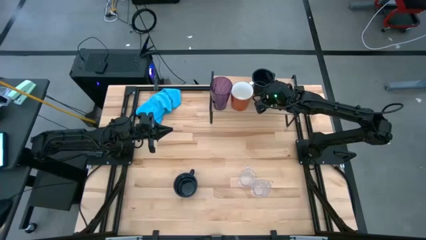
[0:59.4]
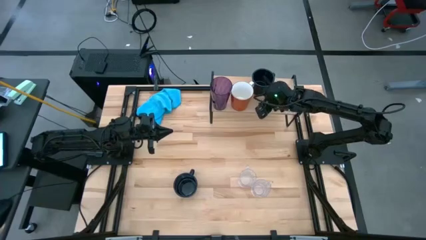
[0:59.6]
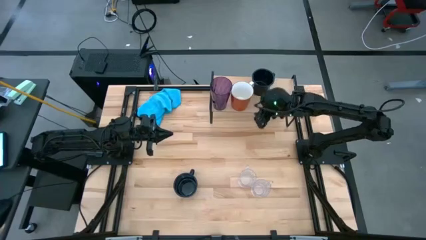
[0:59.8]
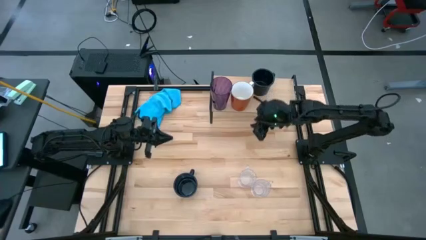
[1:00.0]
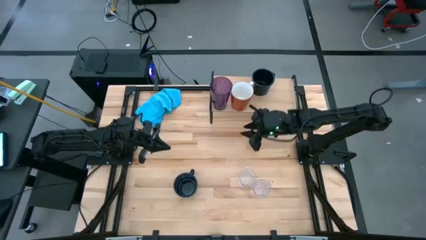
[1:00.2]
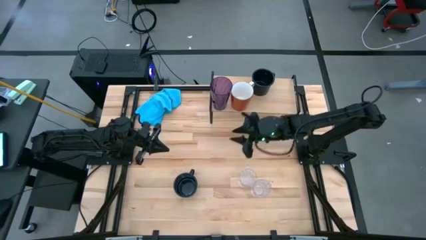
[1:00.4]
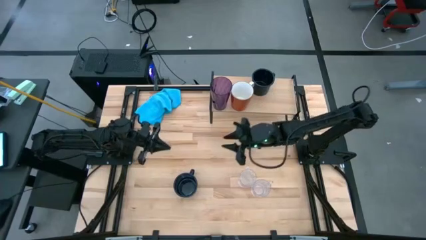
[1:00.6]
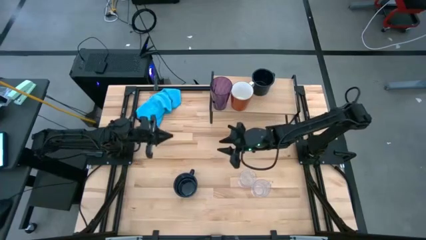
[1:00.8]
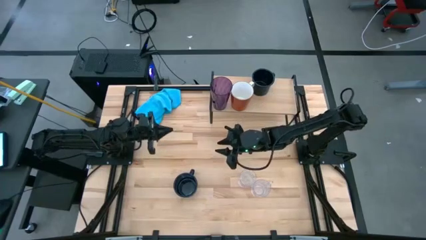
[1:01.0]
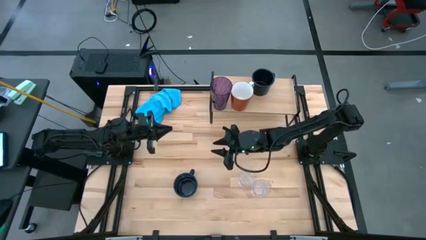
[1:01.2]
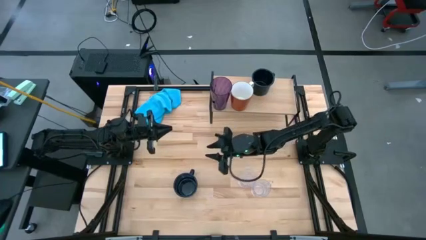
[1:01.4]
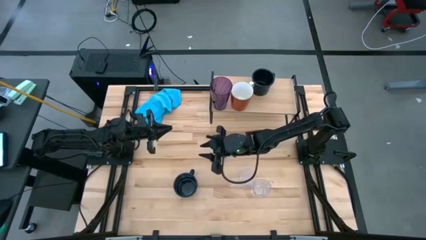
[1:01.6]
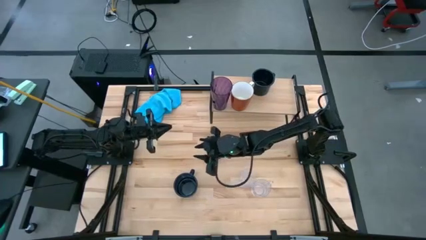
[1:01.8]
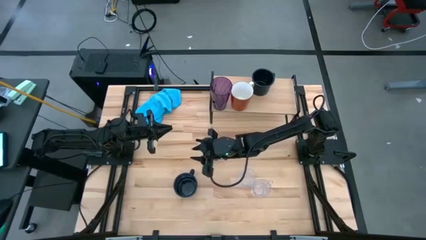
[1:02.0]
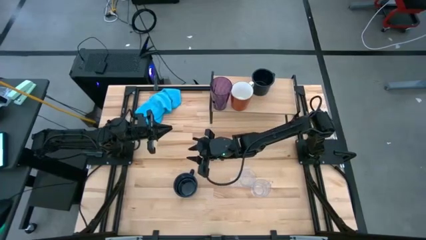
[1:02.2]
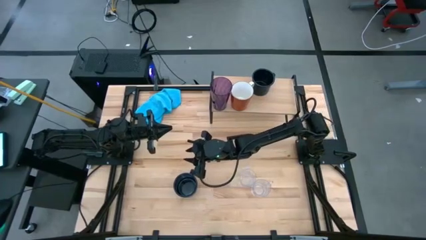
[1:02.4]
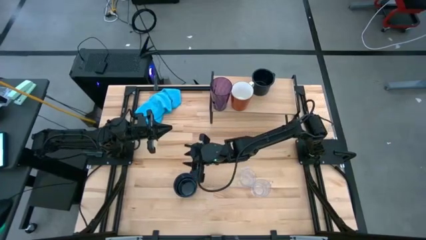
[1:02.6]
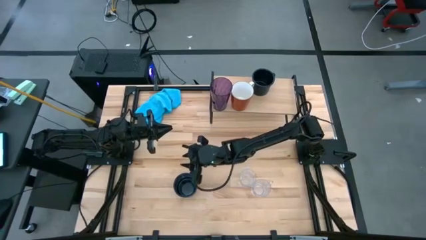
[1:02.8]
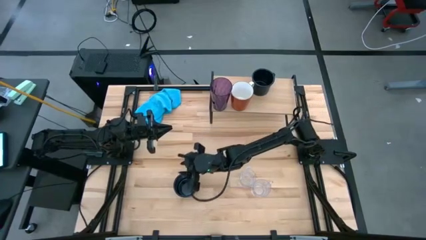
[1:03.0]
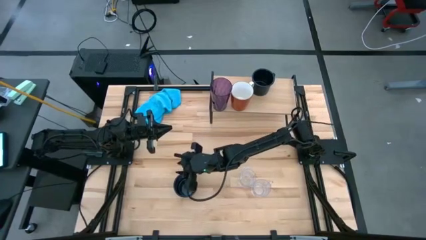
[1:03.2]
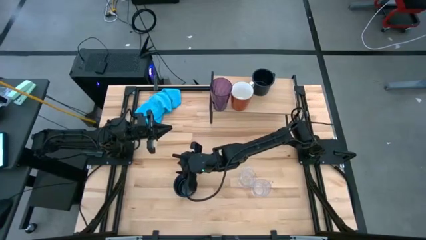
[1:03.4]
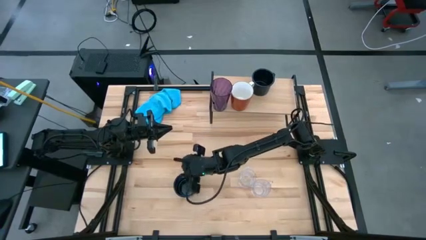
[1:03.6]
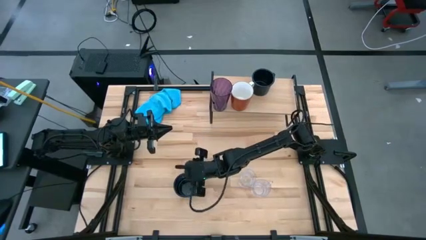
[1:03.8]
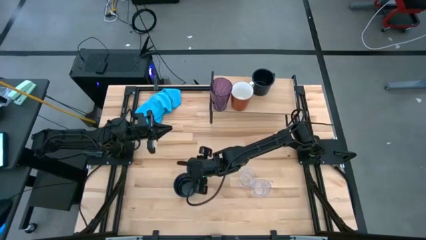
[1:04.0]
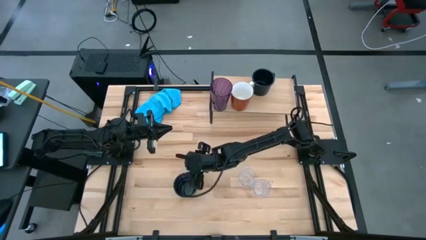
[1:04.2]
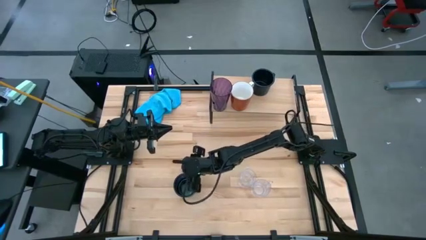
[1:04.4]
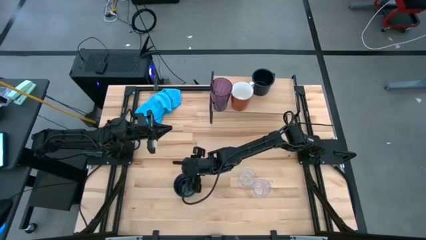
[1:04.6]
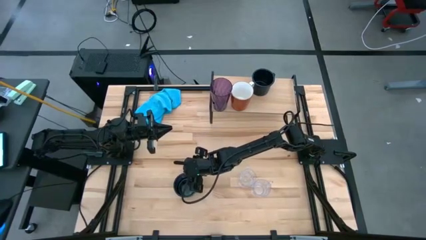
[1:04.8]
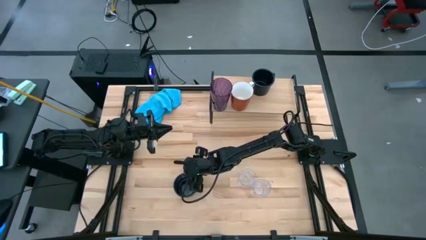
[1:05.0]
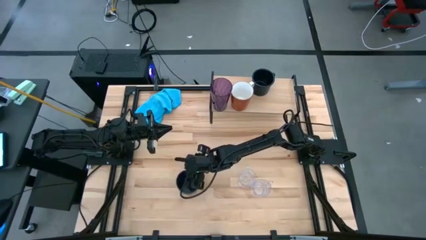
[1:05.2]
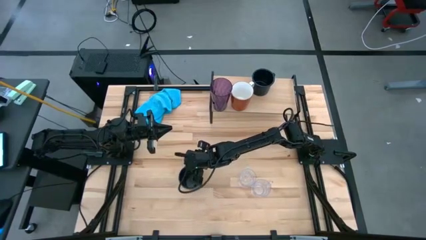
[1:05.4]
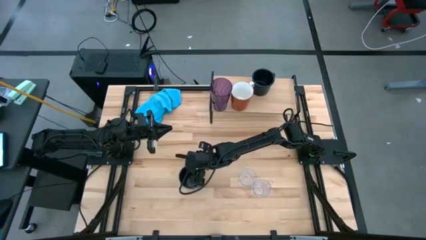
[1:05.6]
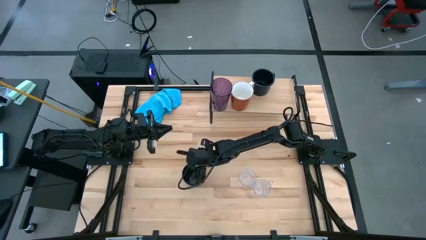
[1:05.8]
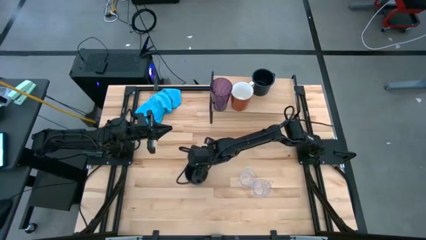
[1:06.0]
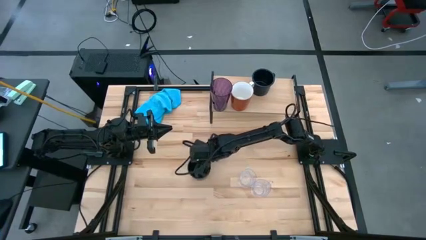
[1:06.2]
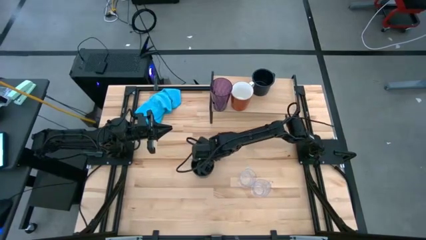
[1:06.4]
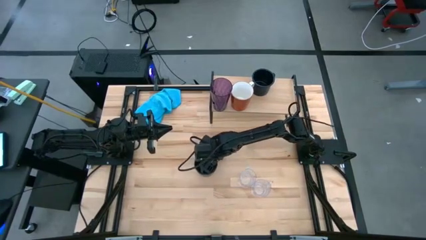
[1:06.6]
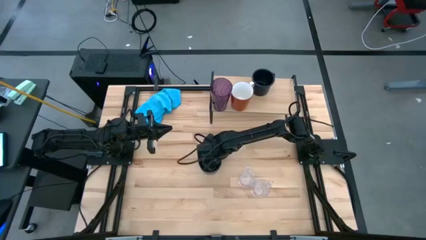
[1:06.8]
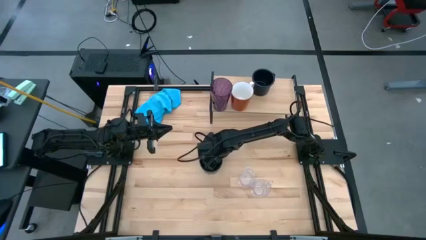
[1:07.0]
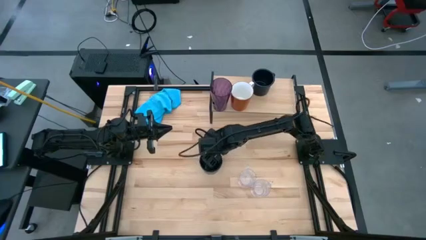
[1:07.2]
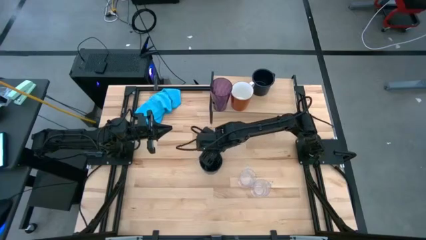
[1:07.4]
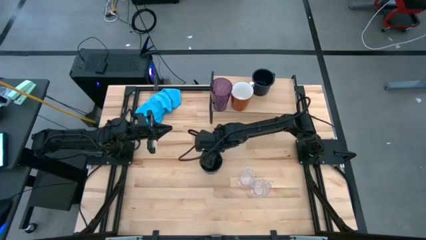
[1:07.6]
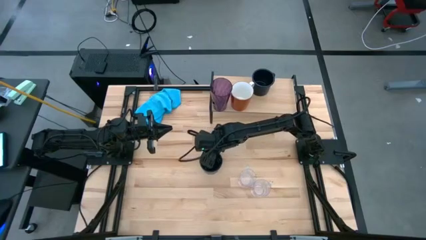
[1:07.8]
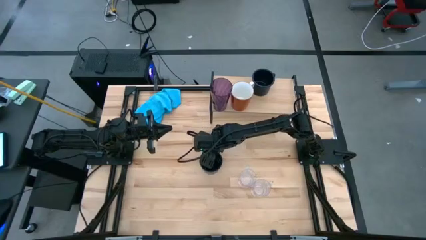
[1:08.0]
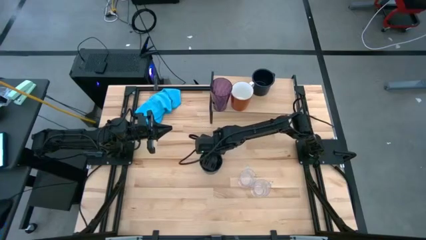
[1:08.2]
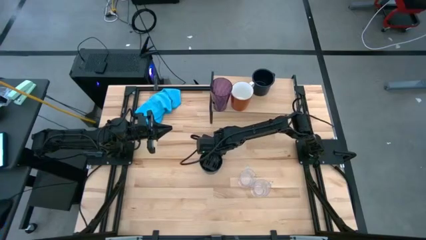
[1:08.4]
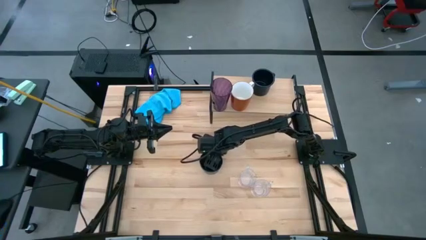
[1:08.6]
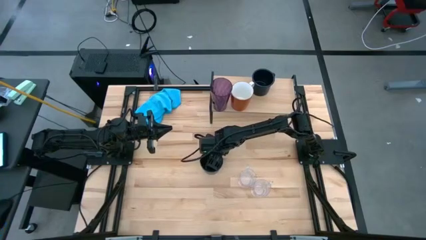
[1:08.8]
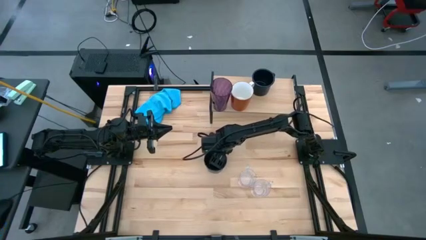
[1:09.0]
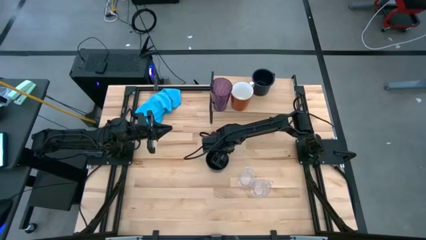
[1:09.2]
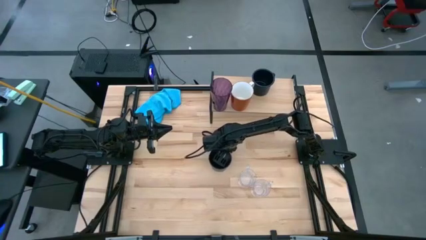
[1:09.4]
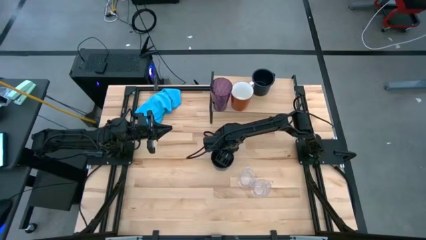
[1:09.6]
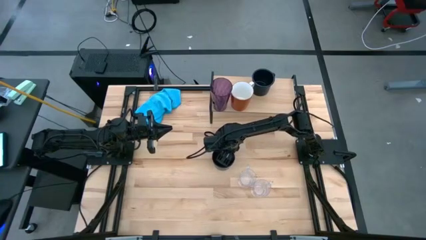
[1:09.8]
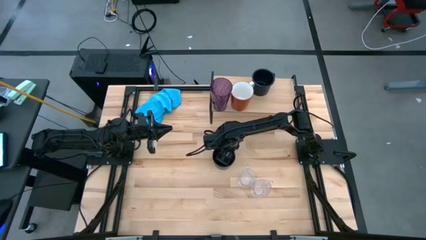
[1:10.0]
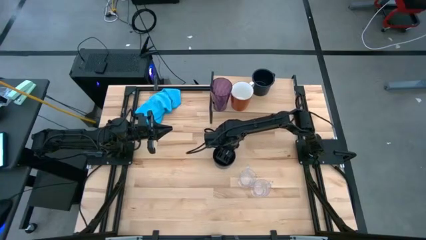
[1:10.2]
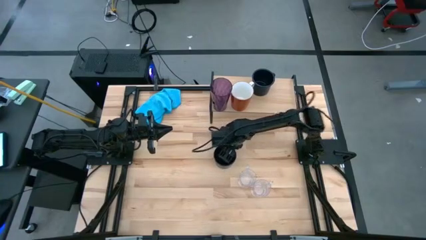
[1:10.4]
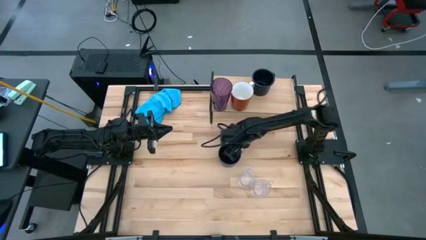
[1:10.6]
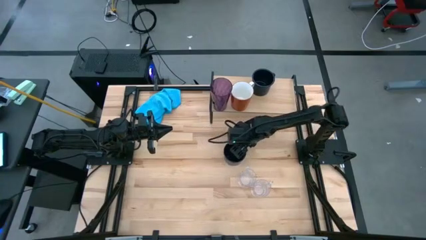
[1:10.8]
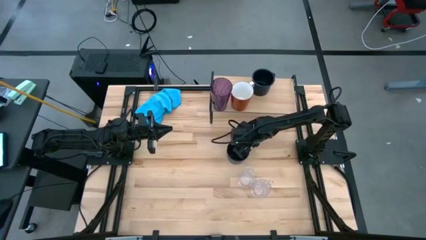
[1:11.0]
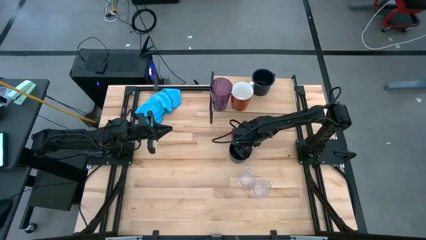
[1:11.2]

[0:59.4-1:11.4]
Task: Stack small to large cups/mugs on shelf
Put the black mug on the shelf aligned with the other black mug

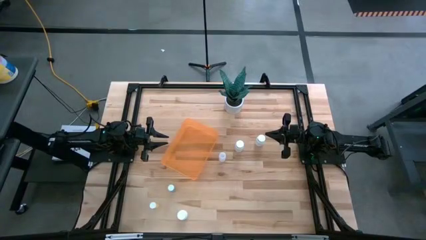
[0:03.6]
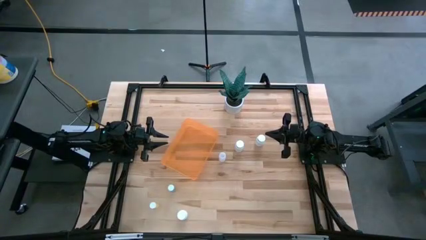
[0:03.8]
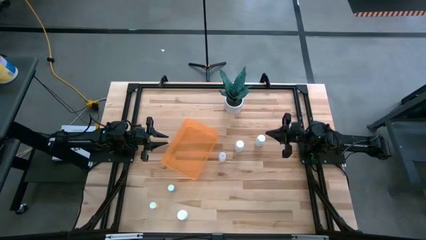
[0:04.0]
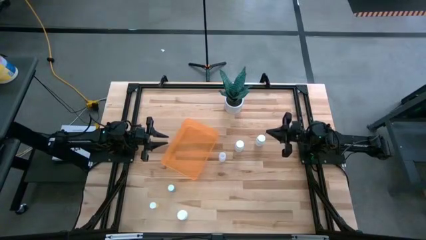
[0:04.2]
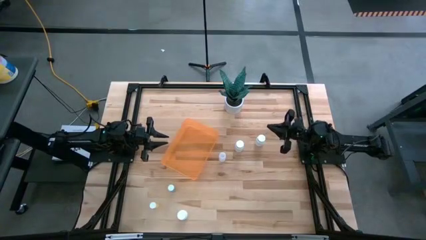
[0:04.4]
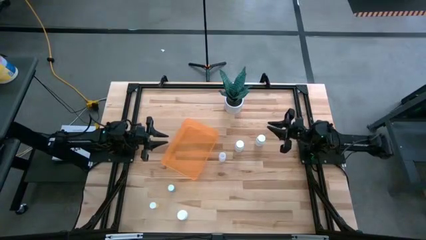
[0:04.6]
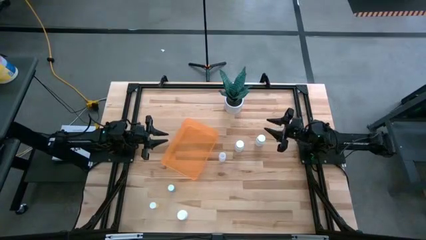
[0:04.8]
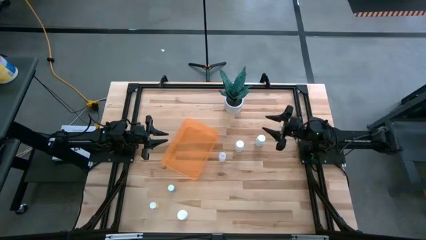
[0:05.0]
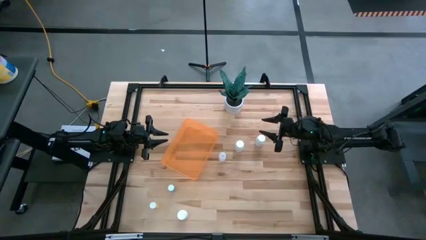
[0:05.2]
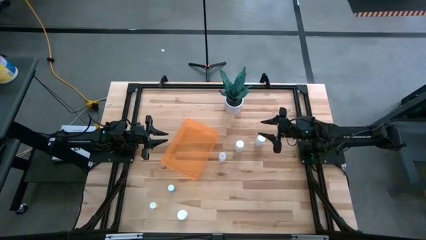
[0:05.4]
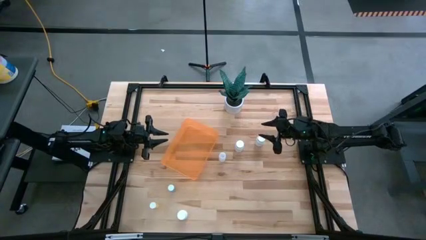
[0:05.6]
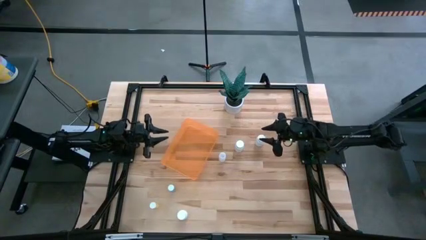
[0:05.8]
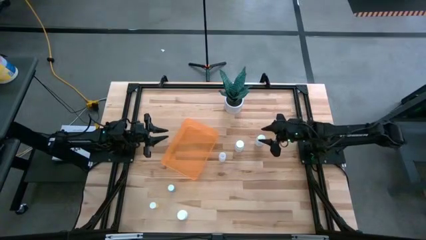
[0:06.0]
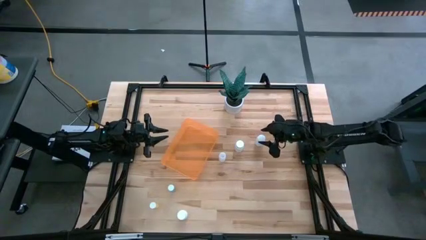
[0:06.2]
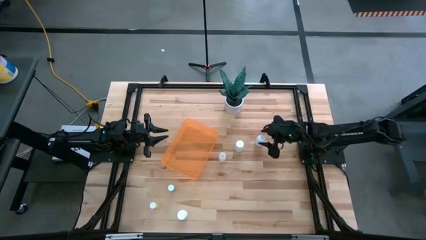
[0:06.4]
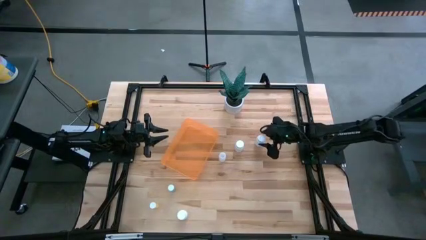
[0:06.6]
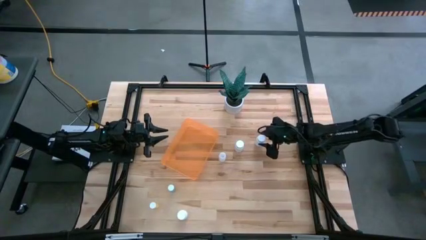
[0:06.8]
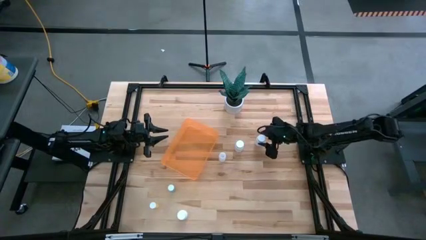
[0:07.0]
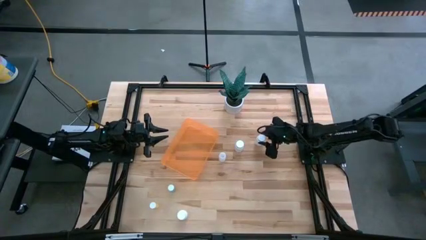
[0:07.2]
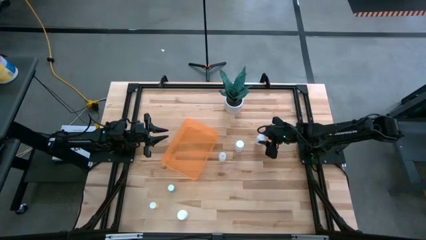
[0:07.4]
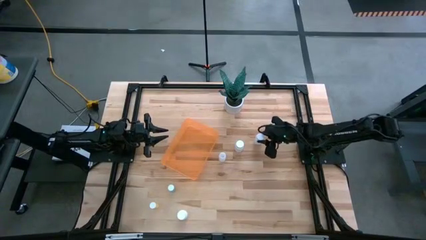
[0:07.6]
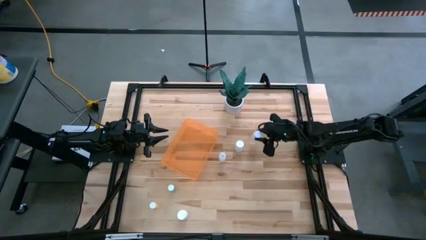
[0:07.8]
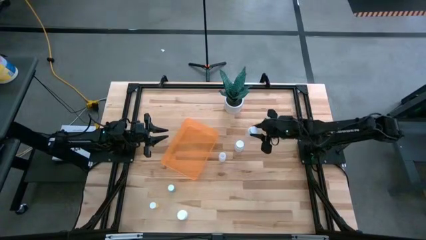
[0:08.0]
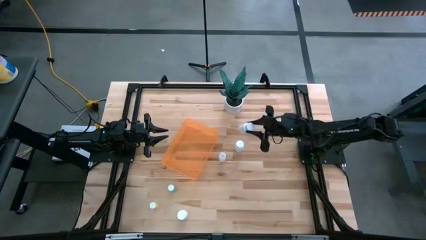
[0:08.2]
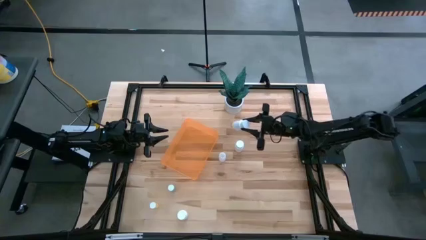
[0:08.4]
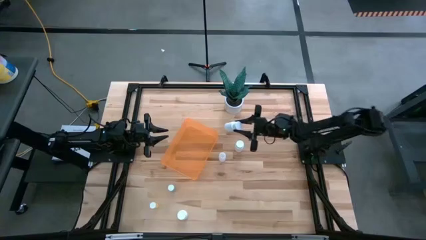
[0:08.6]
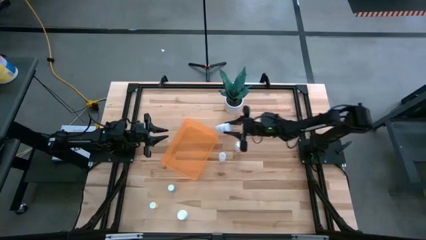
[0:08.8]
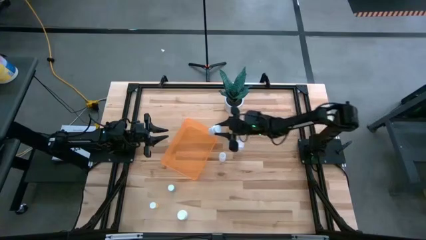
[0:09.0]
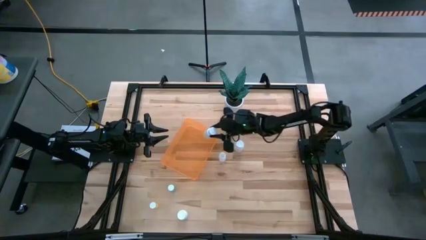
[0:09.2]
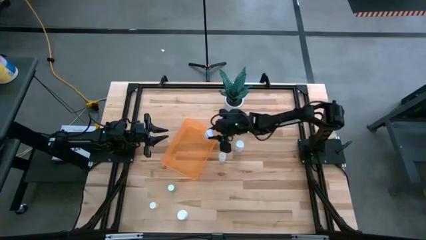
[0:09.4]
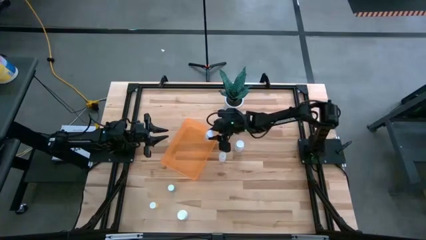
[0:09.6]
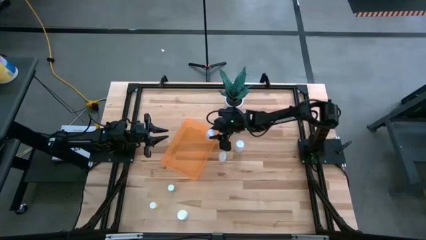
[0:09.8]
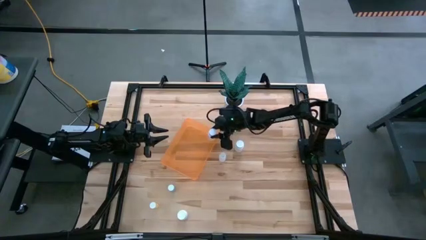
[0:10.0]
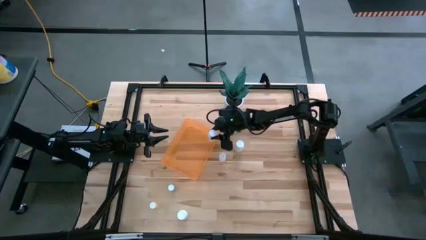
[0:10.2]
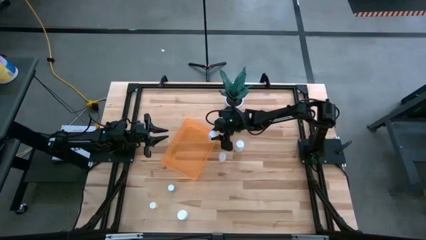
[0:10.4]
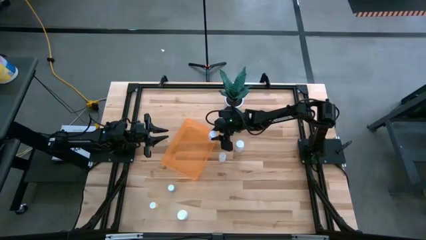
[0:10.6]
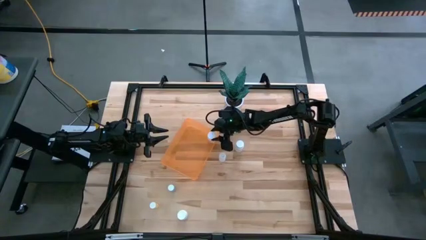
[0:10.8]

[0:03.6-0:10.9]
Task: Pick and place pill bottles into a basket
Put the right white pill bottle into the orange bin
